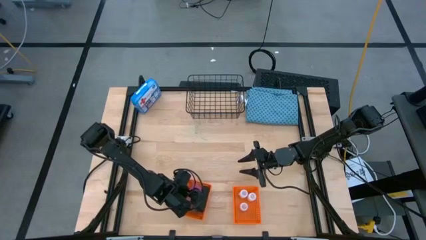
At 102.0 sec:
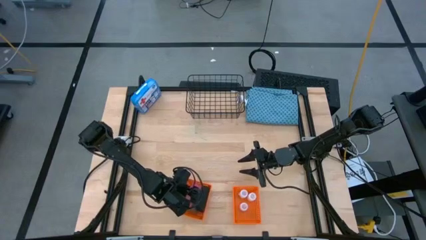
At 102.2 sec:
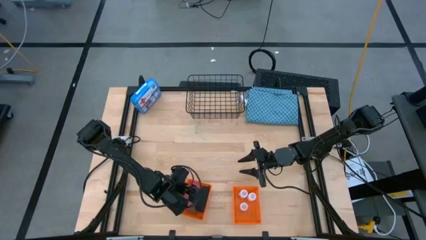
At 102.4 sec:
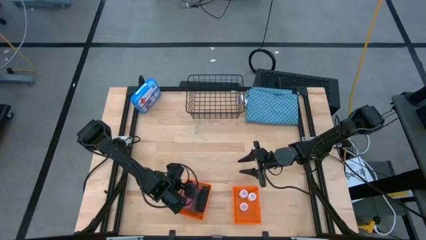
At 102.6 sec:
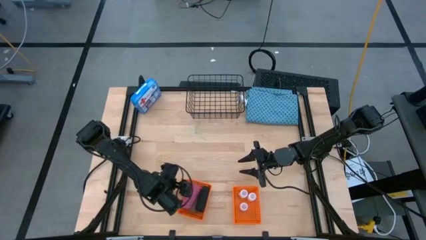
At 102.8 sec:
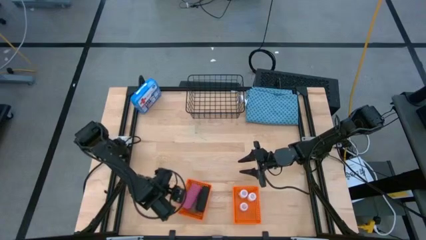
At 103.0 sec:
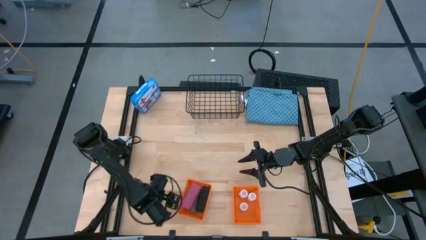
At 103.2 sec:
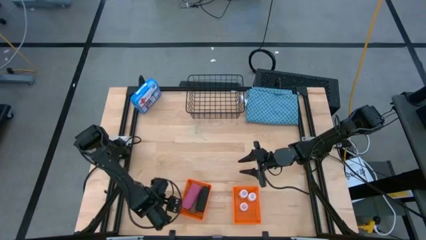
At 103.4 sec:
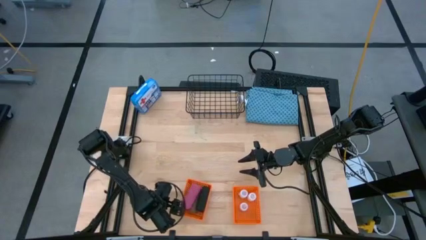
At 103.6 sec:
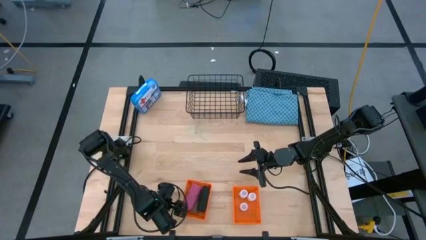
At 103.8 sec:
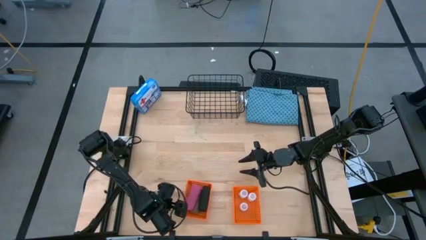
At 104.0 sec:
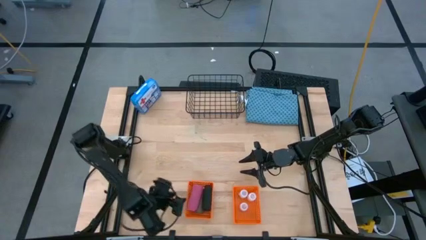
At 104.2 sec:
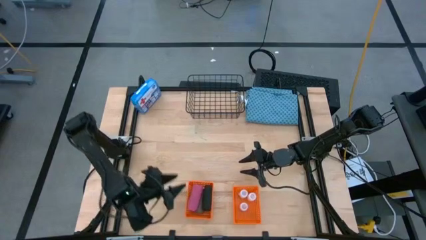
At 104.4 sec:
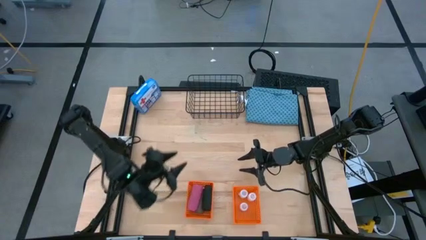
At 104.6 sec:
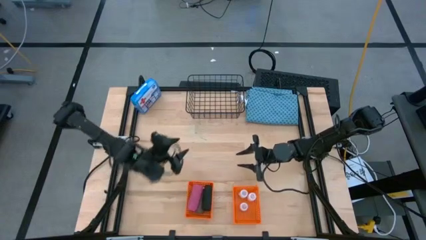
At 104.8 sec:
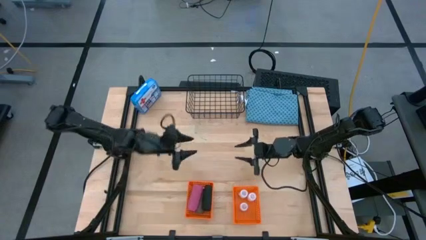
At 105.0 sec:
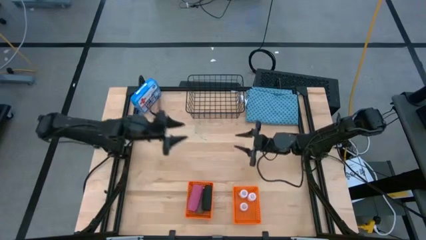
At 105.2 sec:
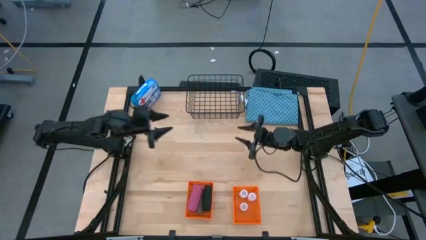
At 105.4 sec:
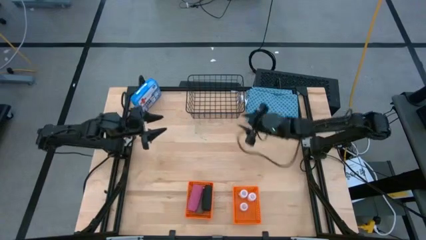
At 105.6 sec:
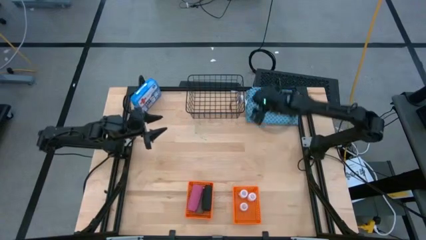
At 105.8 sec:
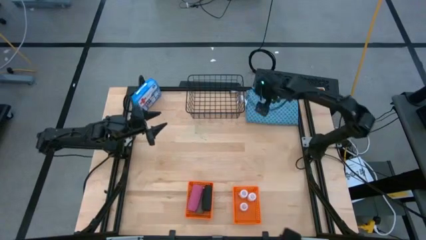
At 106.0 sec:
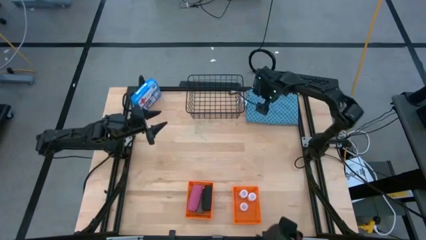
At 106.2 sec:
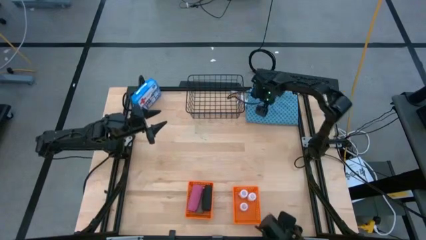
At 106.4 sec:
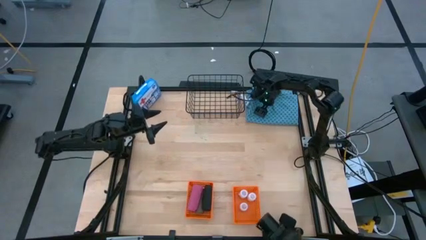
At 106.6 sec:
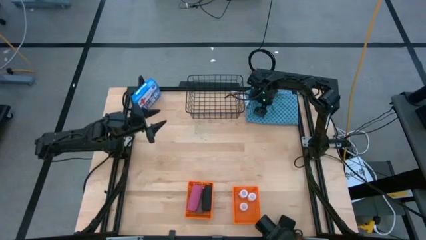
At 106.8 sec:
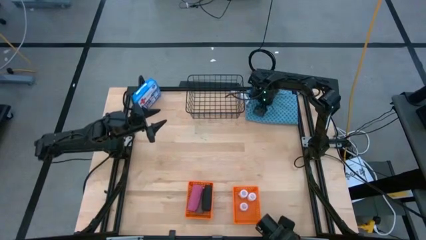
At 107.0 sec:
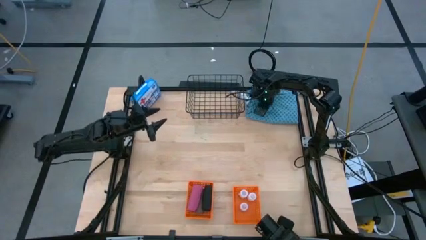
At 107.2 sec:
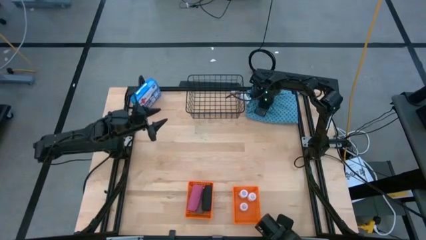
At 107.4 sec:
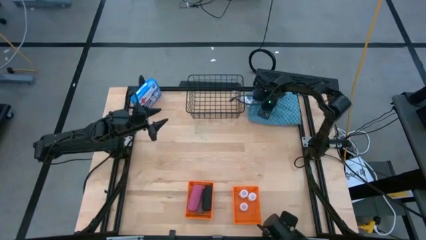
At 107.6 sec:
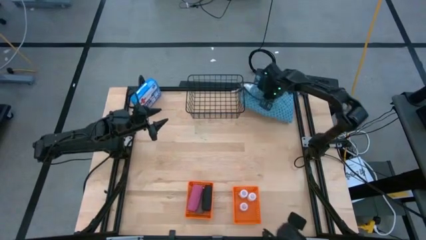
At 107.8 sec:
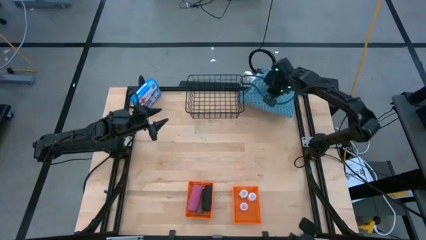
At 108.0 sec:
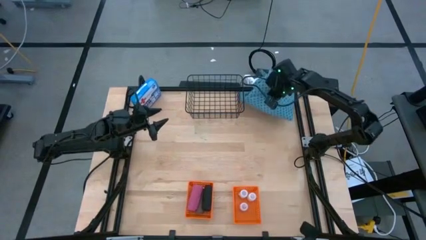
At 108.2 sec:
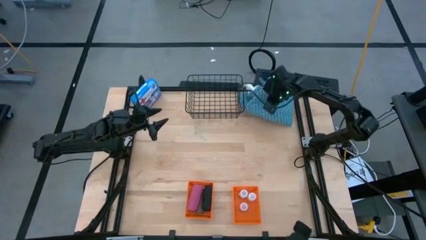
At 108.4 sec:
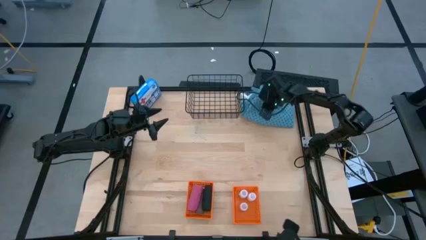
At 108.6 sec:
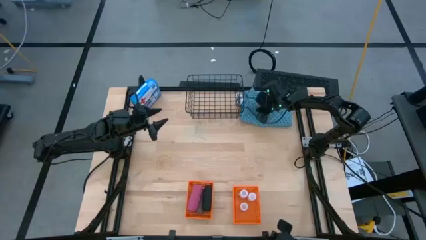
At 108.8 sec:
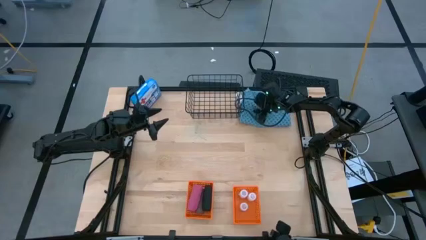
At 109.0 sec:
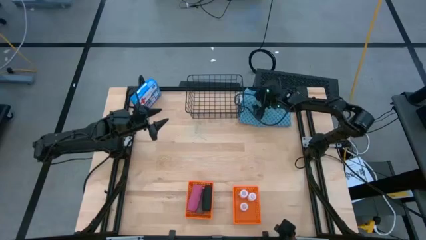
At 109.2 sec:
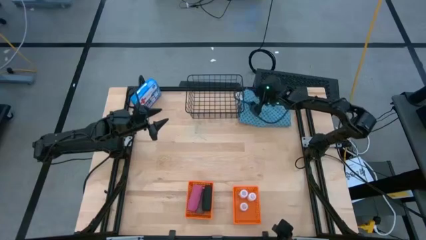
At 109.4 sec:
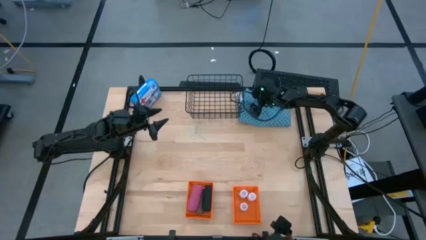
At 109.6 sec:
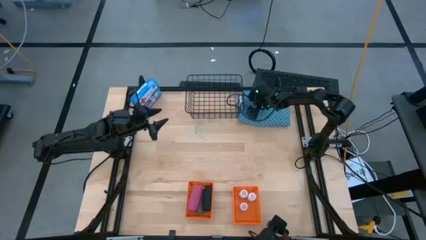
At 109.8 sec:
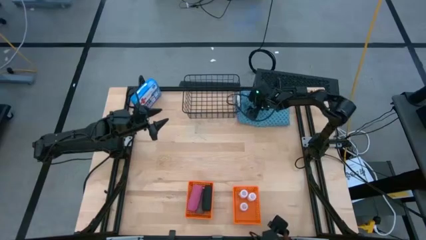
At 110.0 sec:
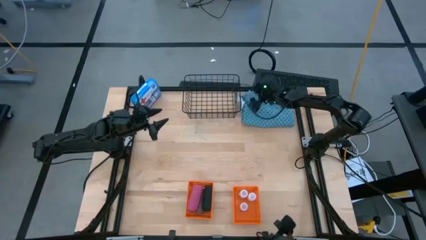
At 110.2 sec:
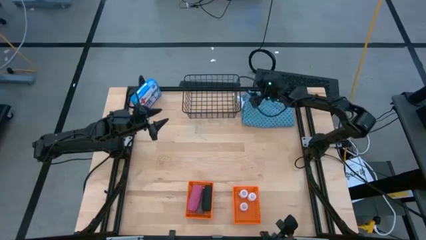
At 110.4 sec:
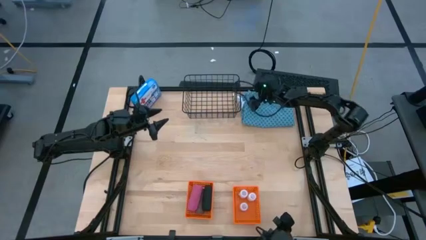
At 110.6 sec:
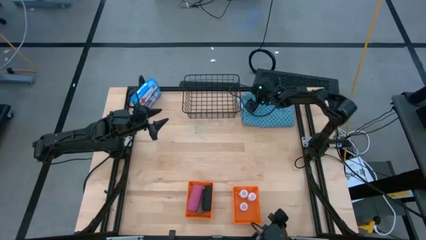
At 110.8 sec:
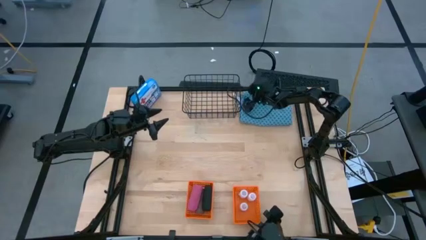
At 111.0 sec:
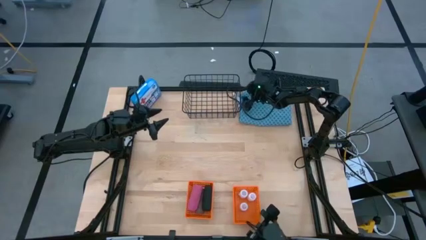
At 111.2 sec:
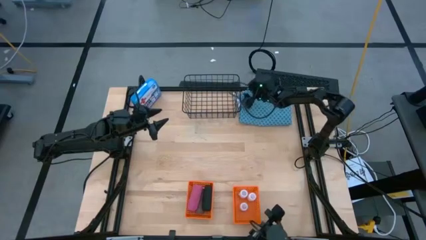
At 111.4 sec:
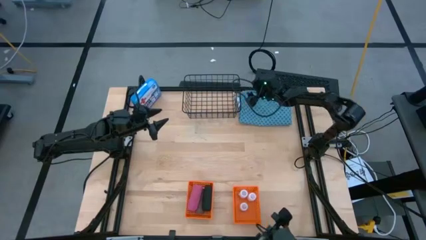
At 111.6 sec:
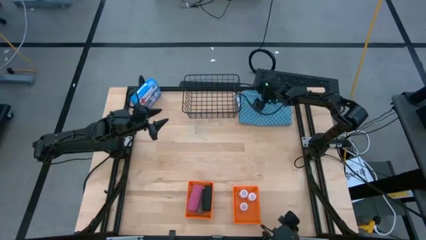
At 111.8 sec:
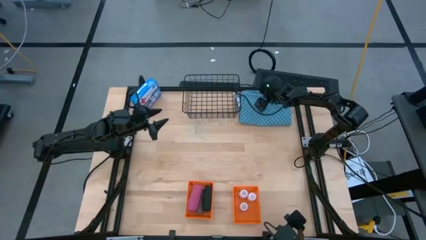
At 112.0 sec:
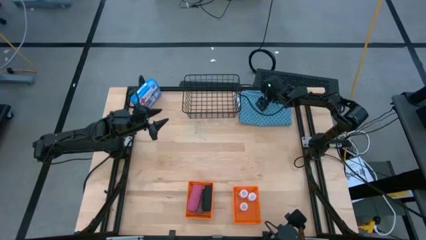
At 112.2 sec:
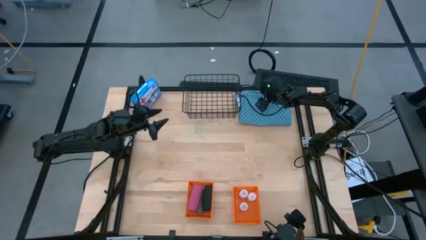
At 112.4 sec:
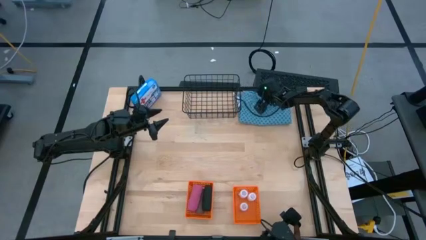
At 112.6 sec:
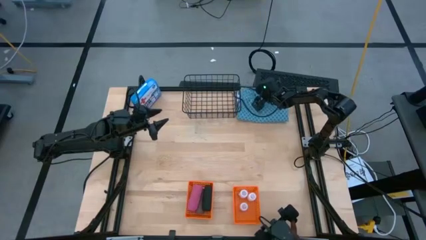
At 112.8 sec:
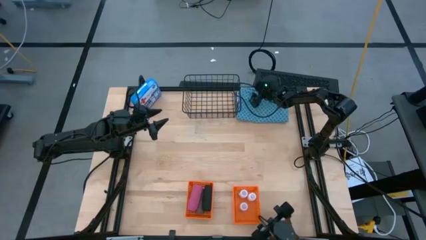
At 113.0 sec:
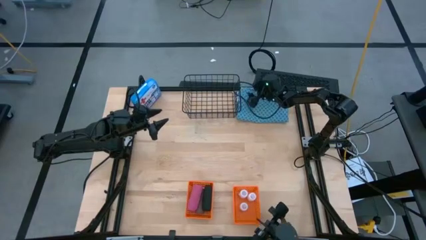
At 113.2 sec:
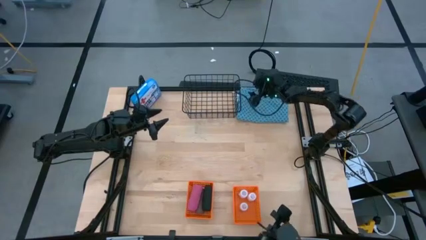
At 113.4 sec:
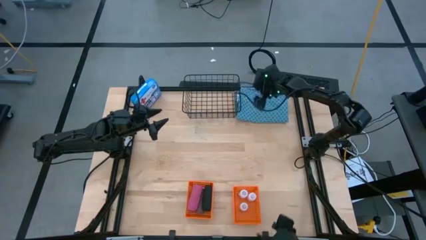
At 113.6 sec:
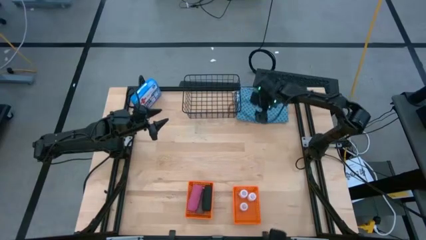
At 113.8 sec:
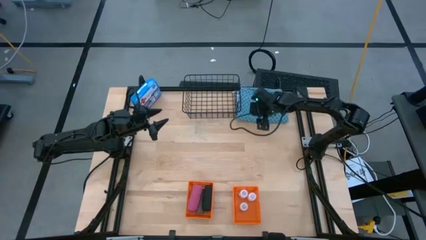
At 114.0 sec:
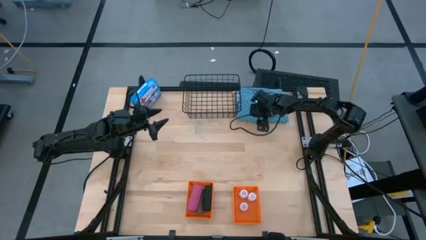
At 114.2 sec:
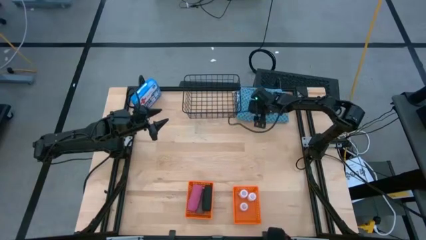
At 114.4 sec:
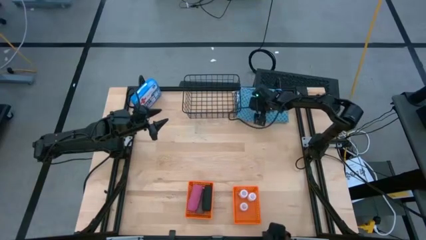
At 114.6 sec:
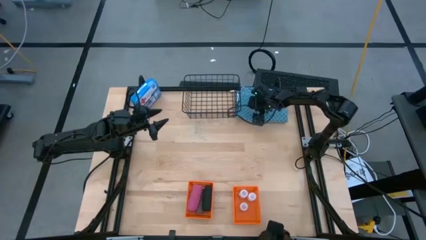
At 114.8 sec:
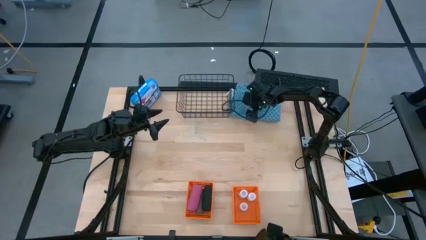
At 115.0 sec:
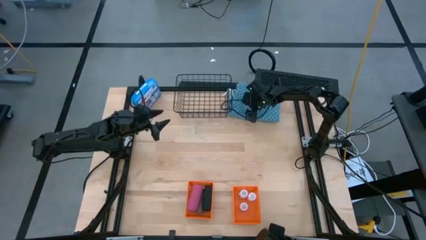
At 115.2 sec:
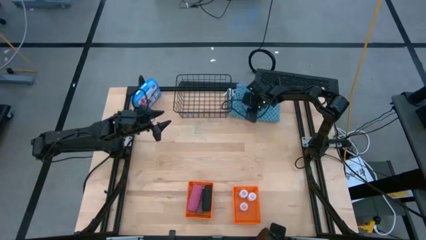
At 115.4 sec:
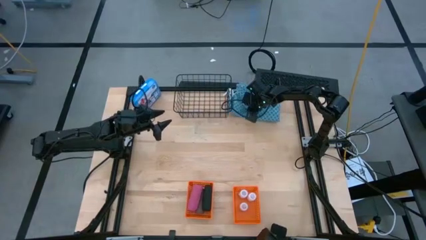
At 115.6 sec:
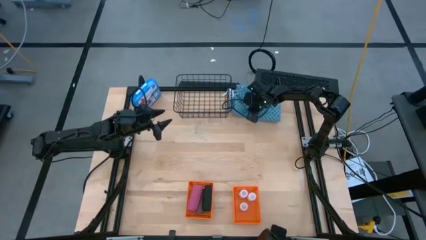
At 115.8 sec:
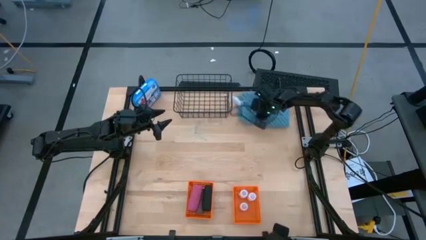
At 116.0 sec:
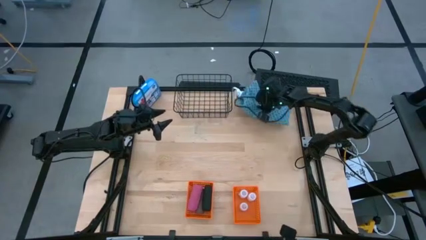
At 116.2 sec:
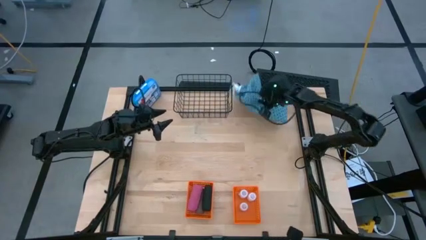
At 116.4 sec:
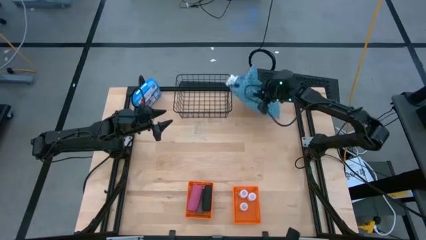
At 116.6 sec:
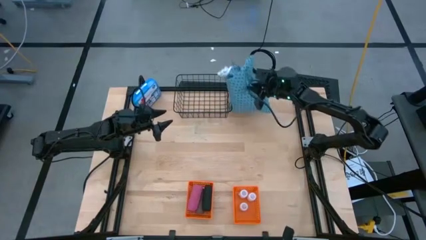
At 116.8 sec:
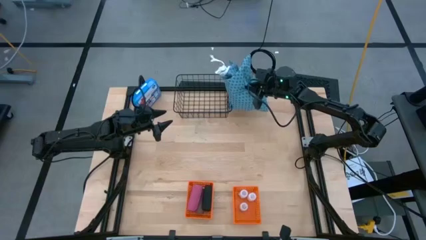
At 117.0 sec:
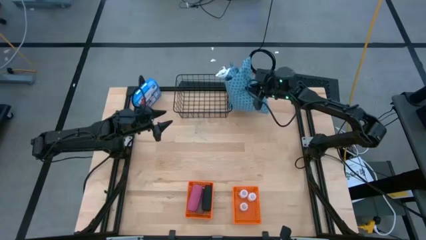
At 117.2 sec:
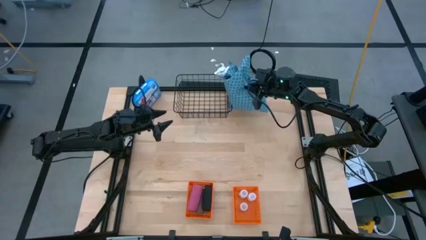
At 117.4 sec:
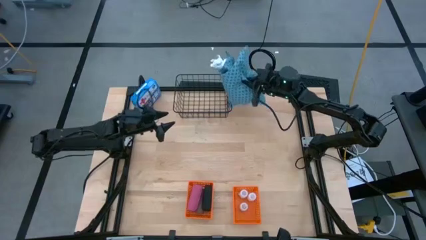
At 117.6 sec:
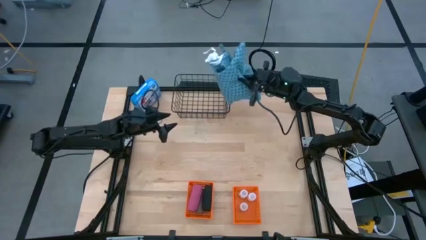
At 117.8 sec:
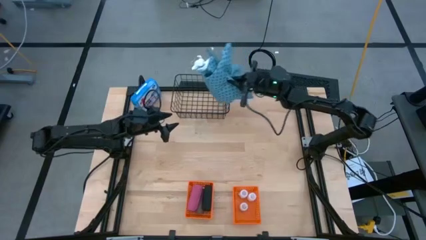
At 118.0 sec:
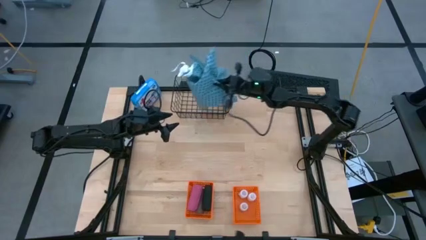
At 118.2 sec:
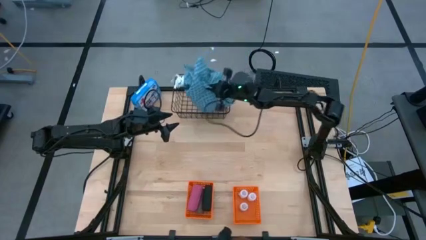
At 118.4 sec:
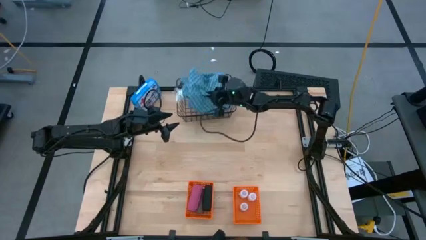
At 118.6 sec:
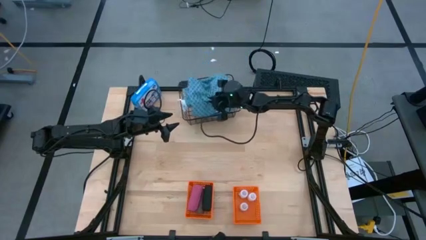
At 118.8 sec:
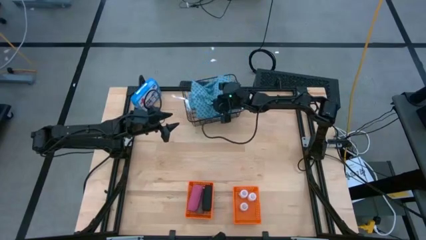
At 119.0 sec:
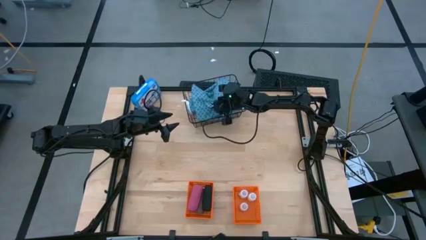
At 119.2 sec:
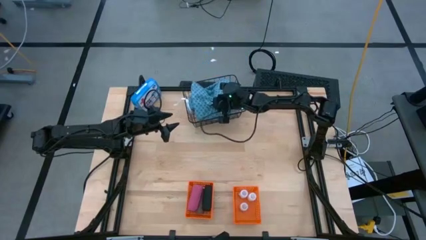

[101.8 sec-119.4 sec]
Task: Pick & Place Medicine items
Put the blue patient gown into the black wire basket
